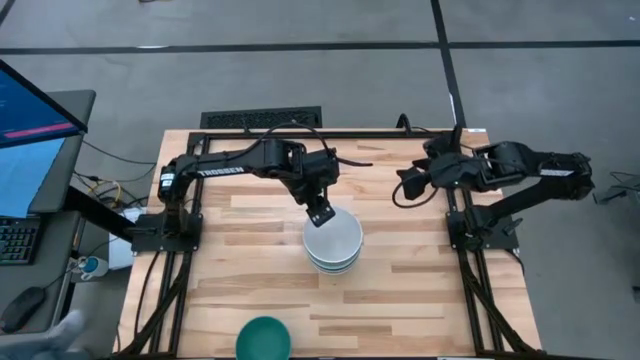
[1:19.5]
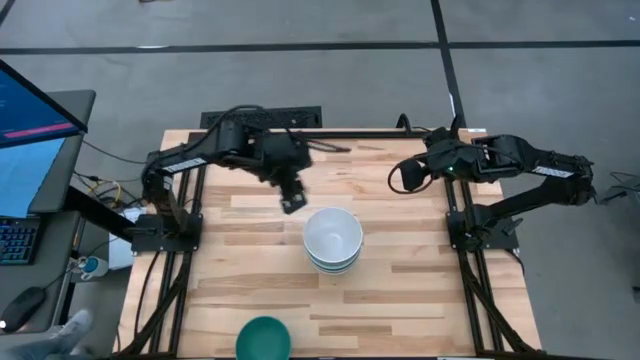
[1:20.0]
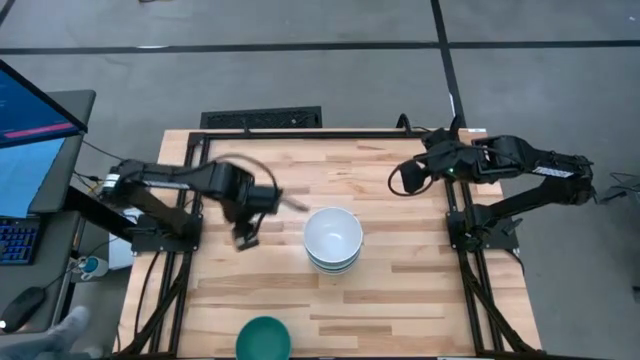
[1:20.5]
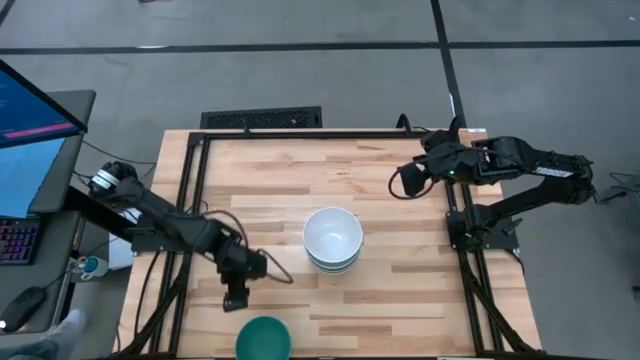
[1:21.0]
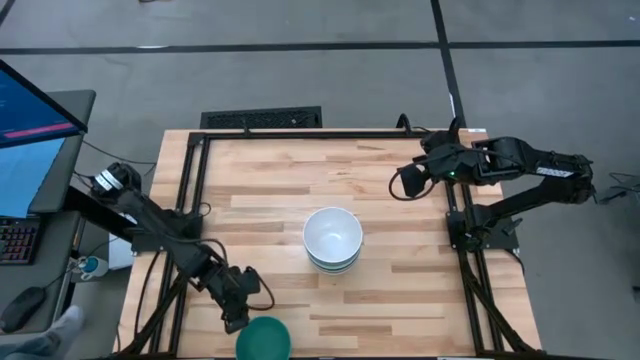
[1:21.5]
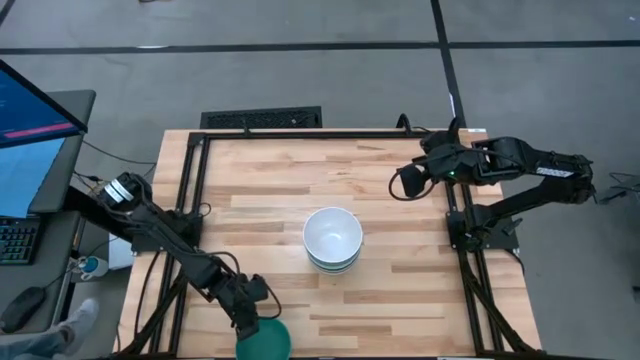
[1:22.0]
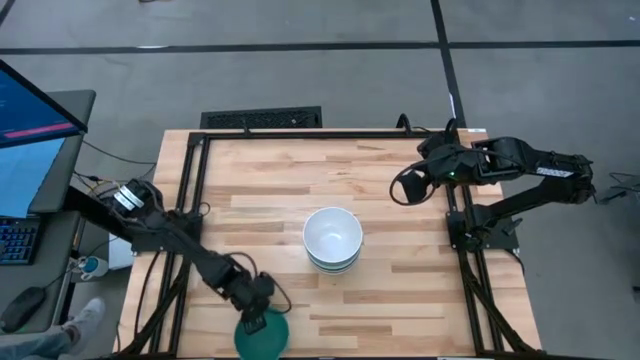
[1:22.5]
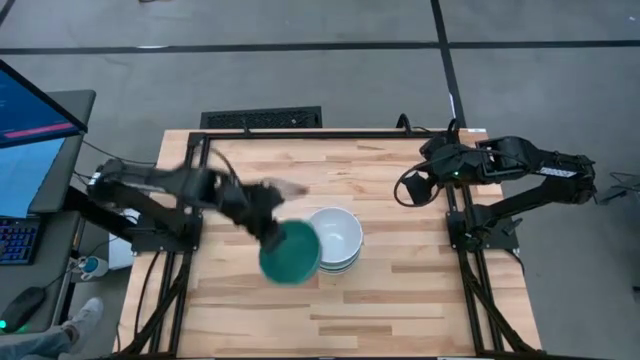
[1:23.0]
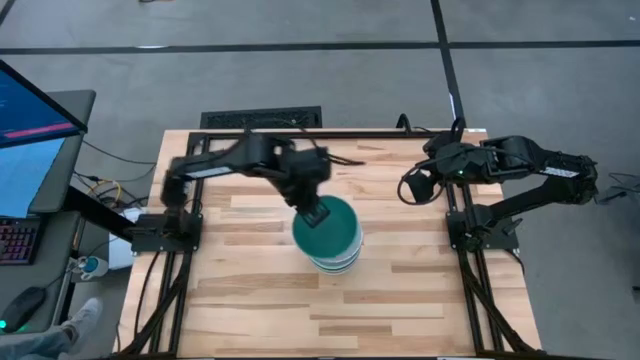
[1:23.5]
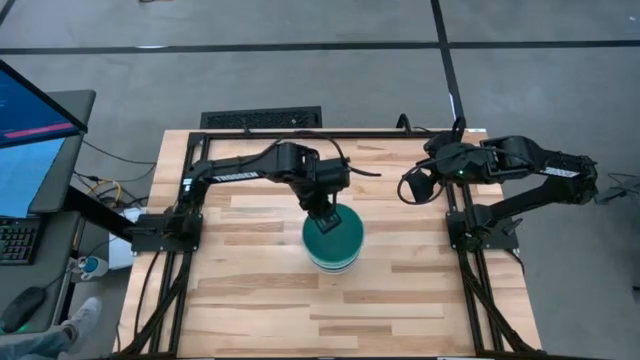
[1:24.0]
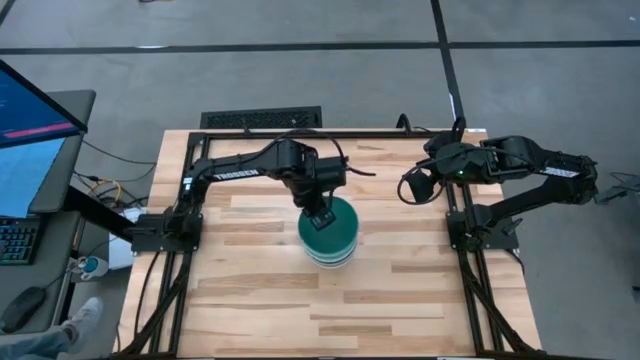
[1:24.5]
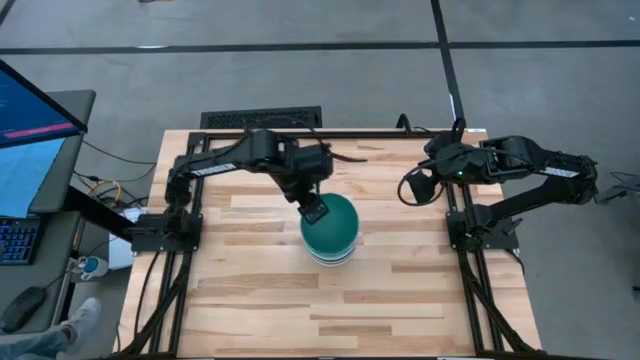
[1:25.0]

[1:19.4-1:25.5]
Task: Nest bowls inside each other
Stack the green bowl on the white bowl

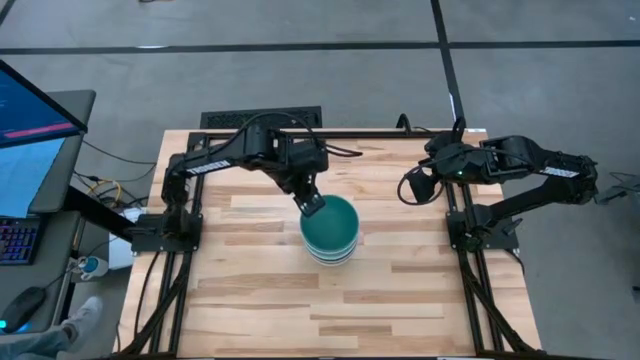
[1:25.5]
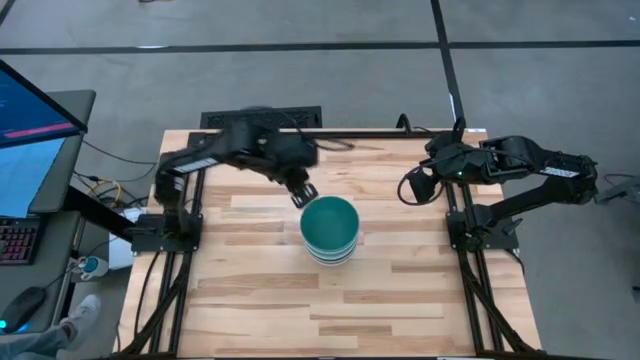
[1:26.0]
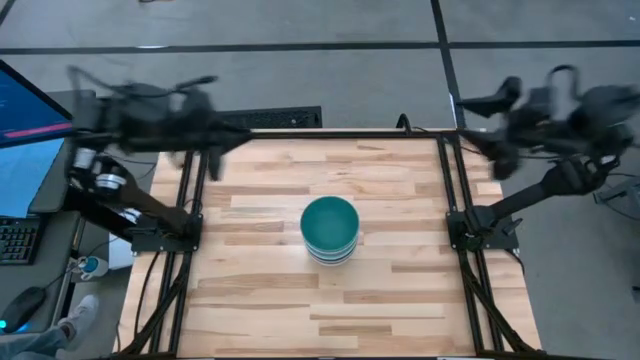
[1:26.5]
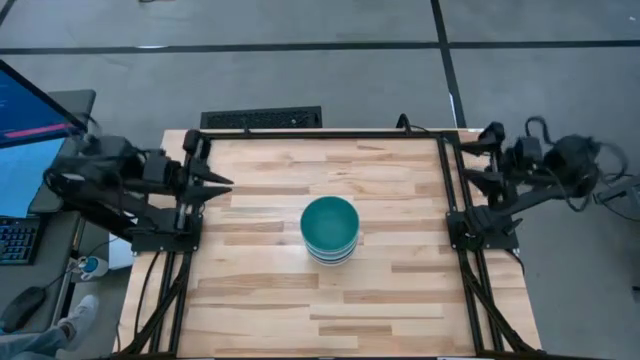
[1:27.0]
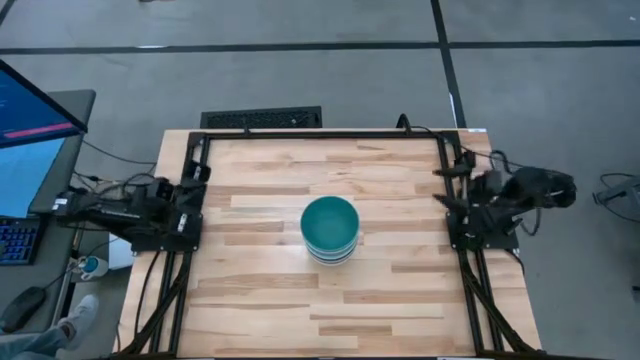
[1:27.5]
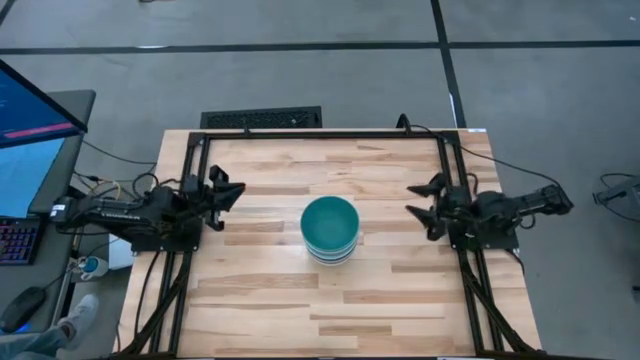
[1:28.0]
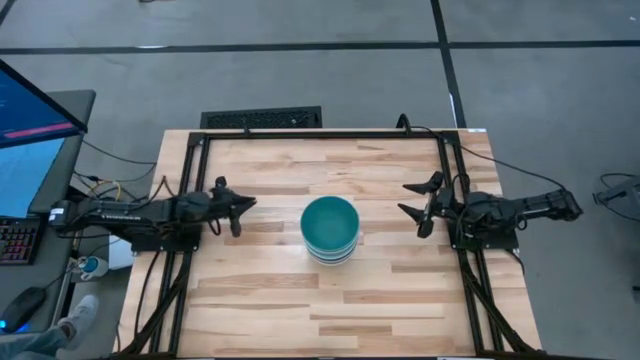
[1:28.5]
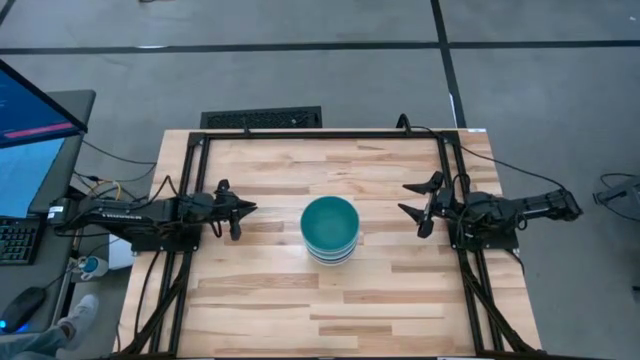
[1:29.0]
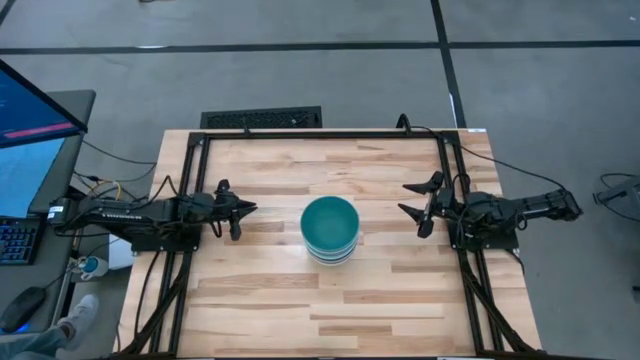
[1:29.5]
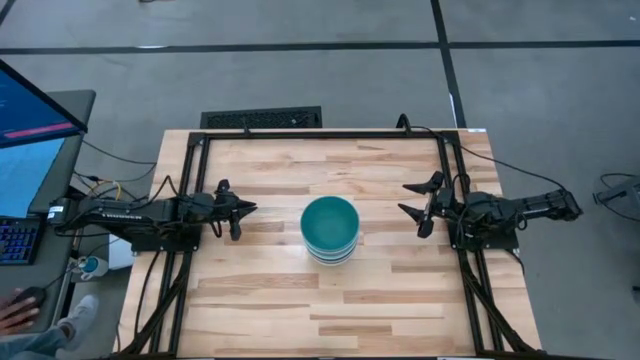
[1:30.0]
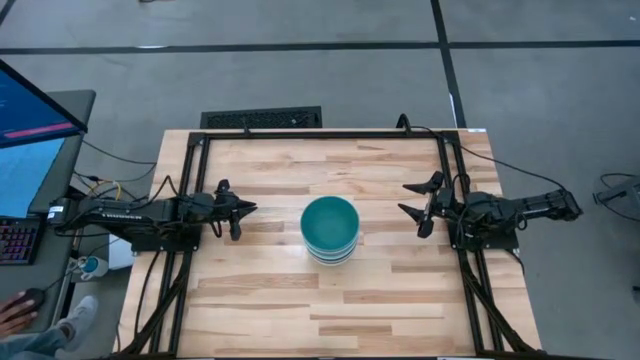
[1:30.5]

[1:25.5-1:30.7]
Return to Home Position

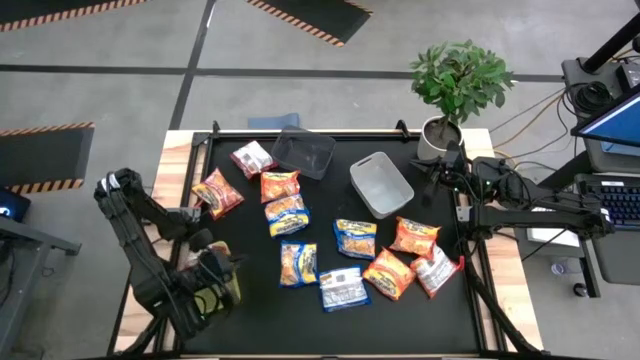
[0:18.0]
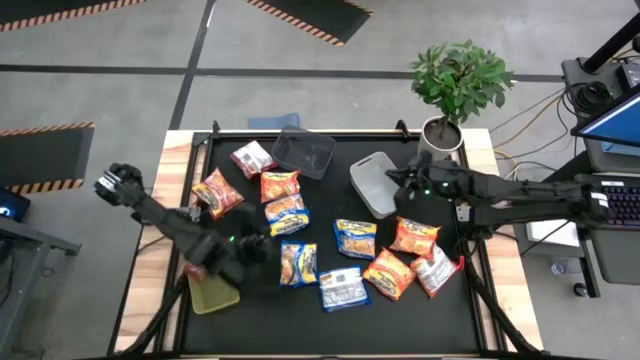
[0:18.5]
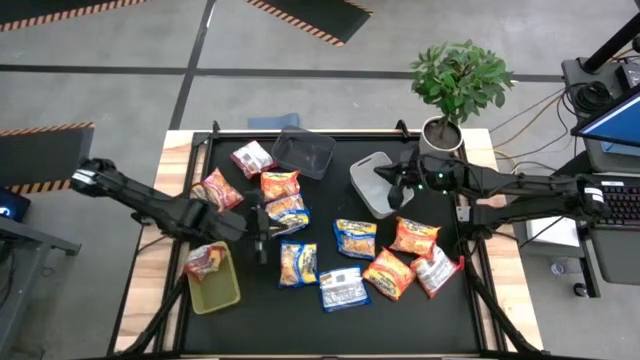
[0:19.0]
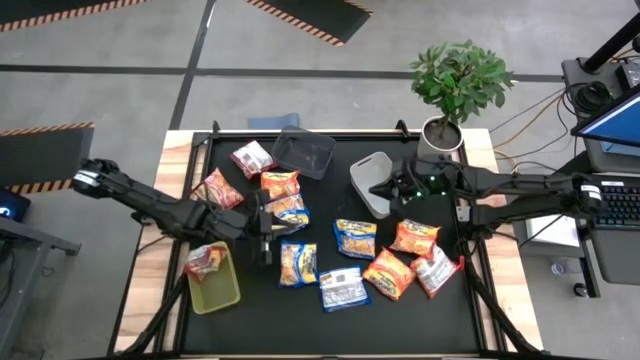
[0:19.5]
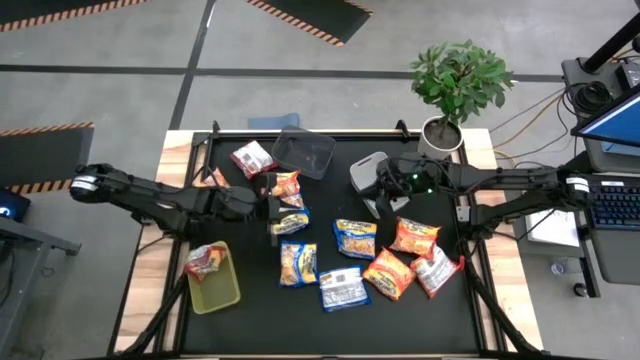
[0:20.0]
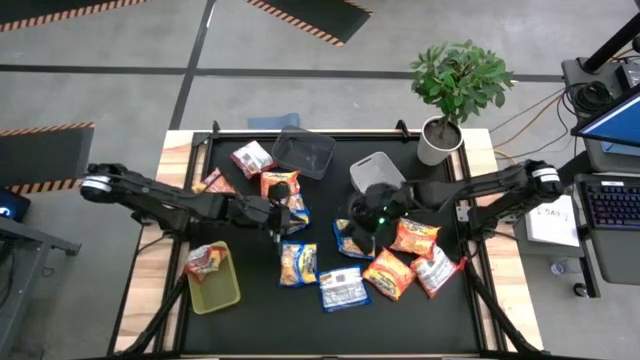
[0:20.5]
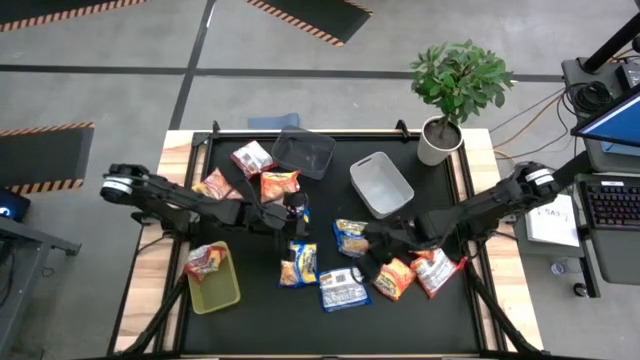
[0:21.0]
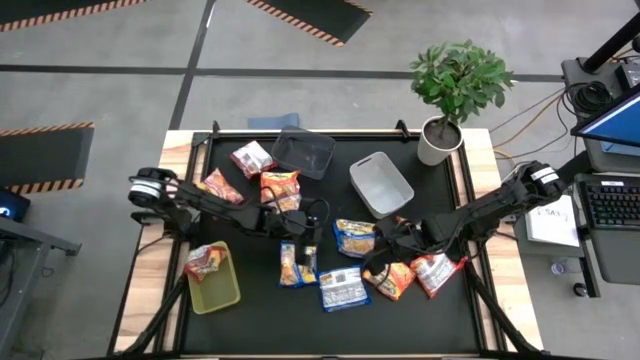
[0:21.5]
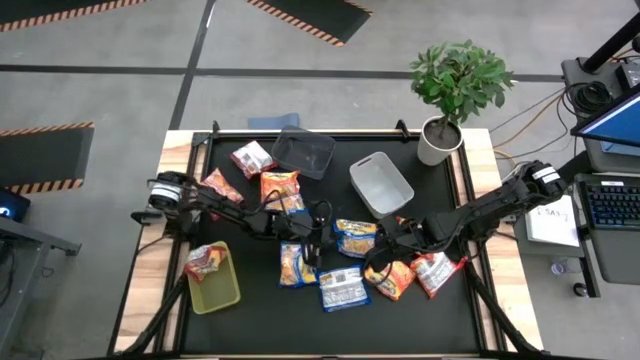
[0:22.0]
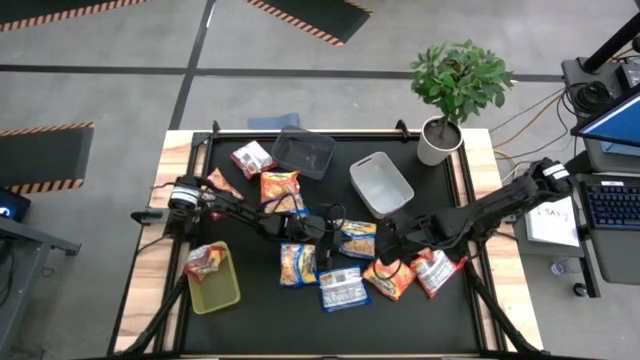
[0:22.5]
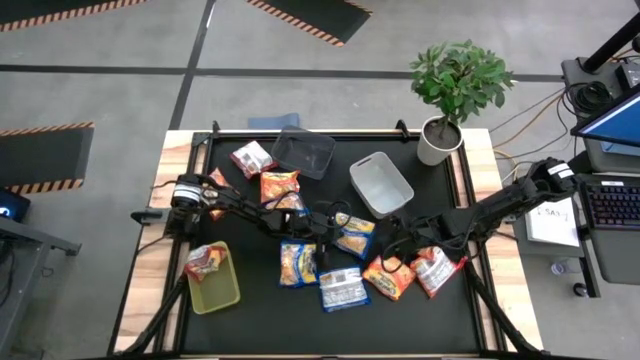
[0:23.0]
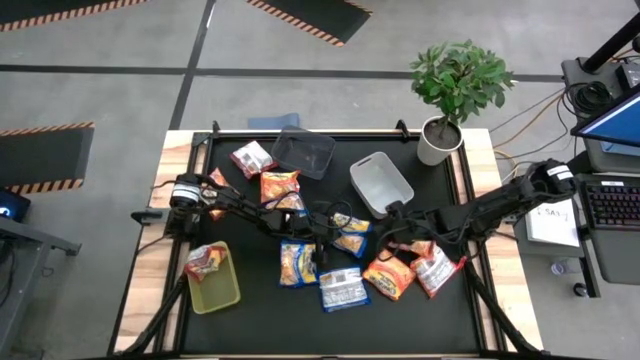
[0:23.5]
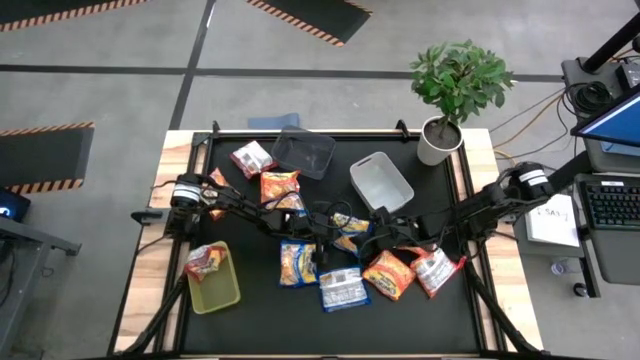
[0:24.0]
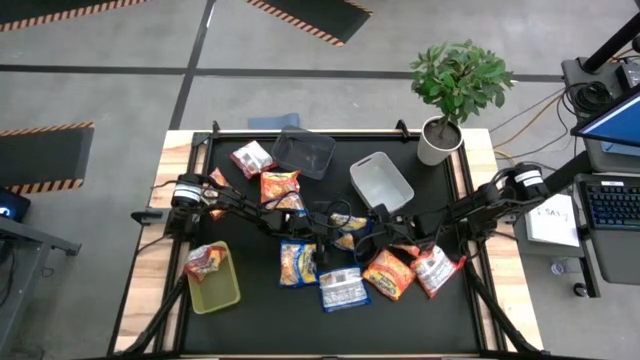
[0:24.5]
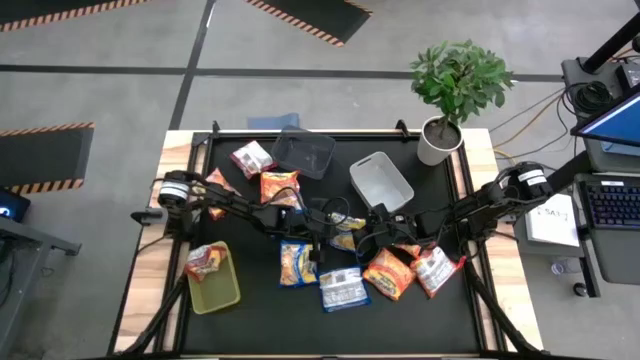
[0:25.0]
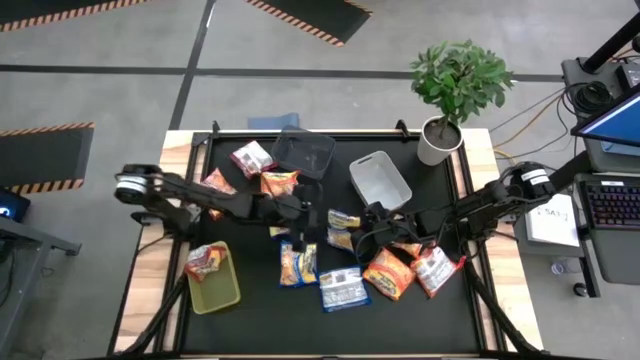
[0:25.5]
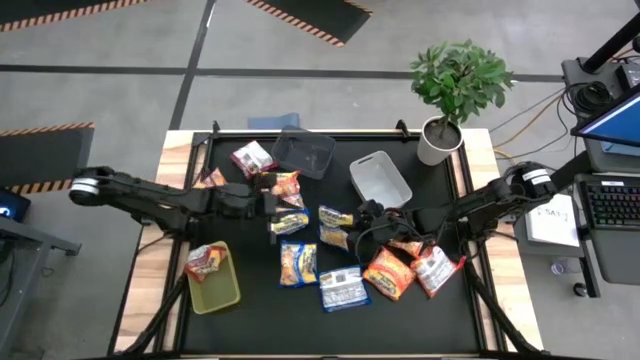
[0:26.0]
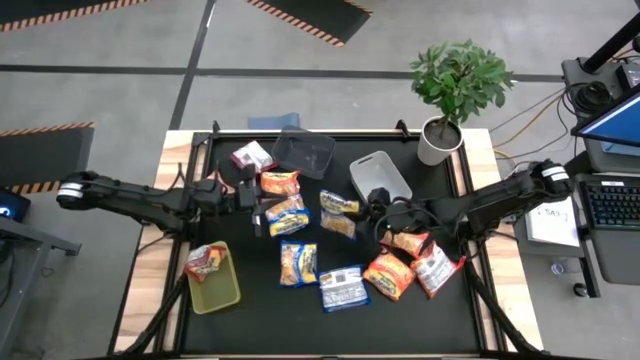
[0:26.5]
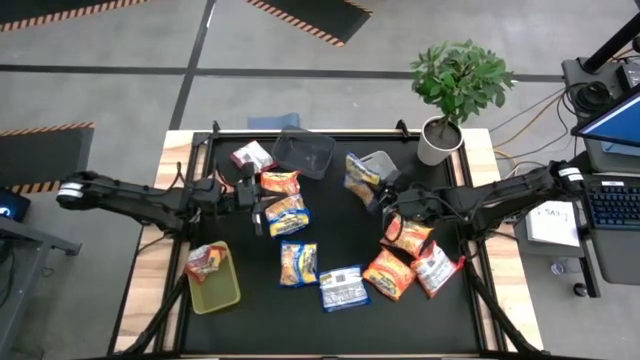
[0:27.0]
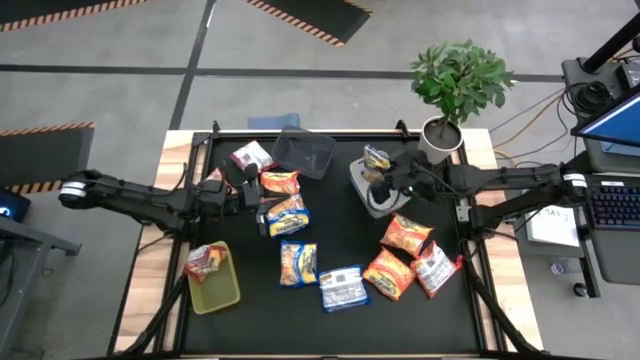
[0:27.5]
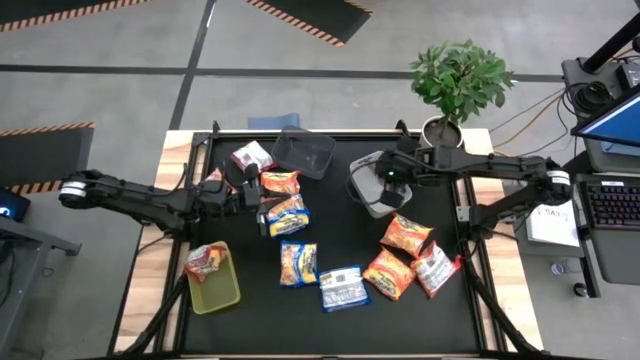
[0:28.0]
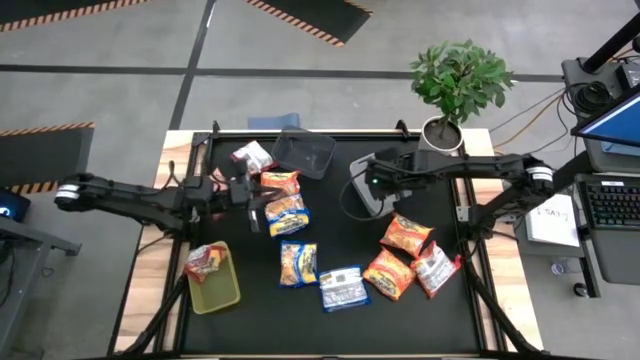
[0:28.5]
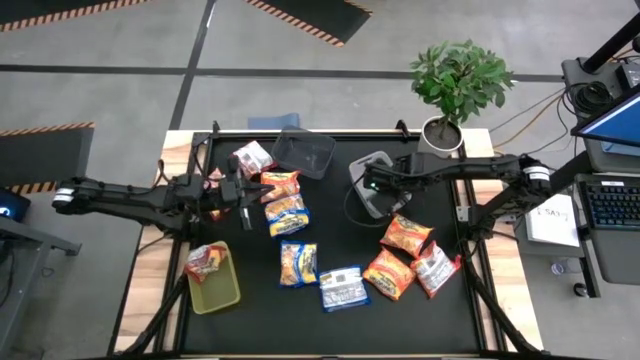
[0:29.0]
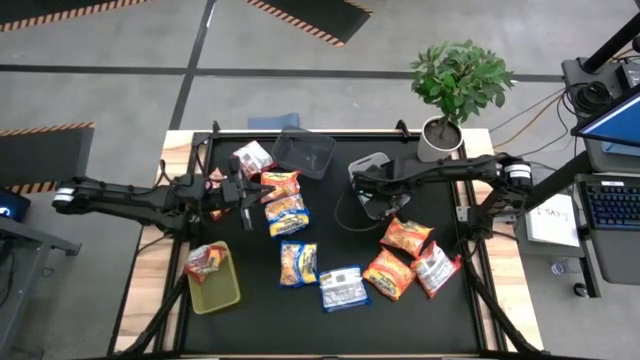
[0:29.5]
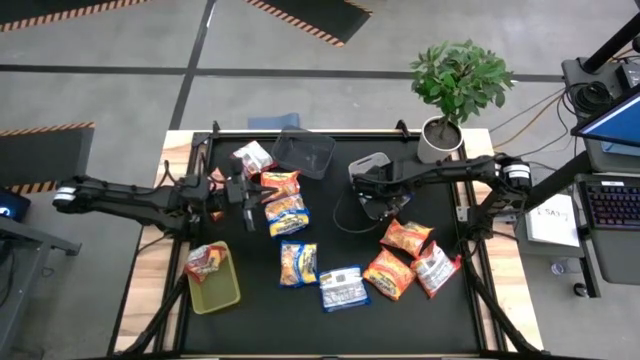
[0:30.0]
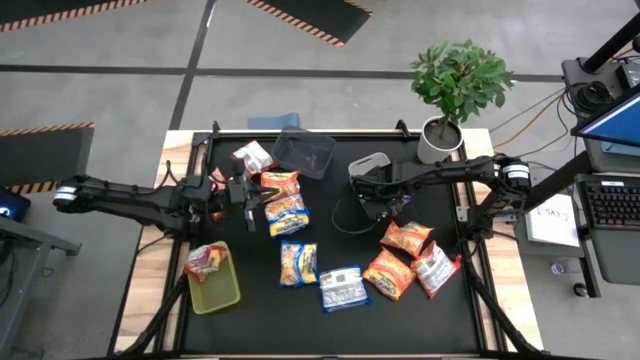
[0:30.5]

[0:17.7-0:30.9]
Task: Sort Maruchan noodles
Put the blue noodle pack into the white bin
